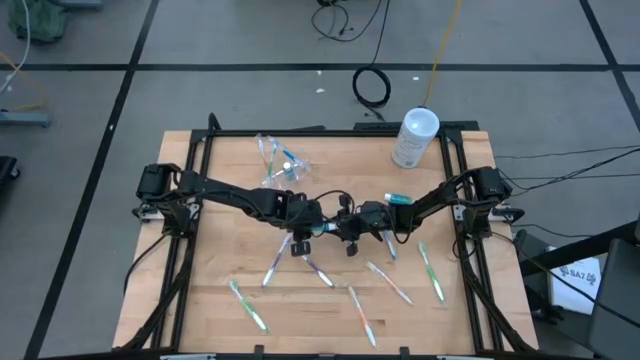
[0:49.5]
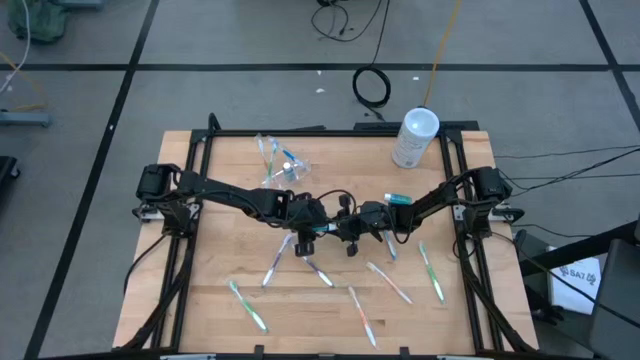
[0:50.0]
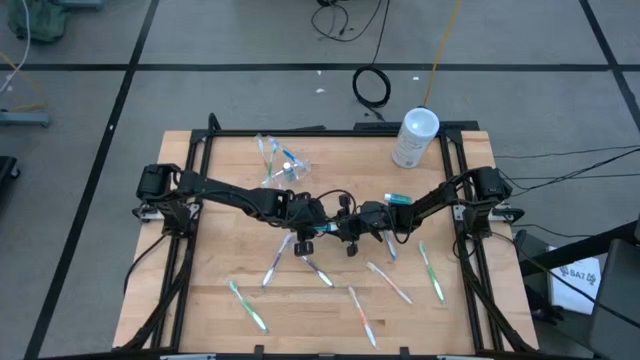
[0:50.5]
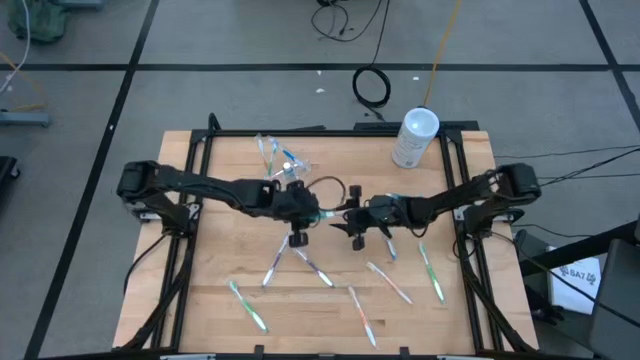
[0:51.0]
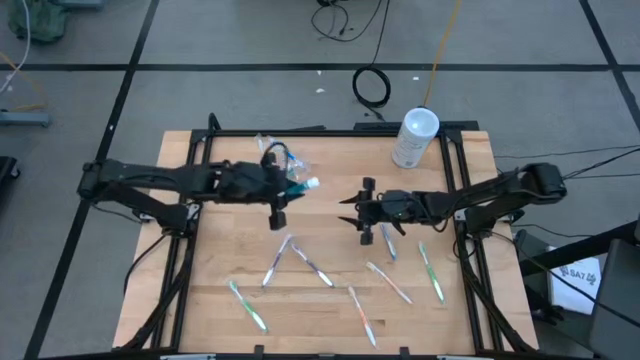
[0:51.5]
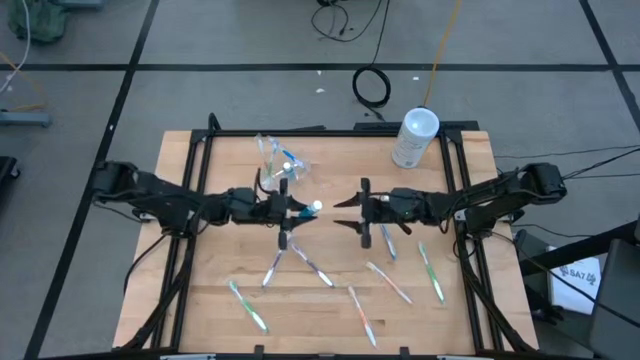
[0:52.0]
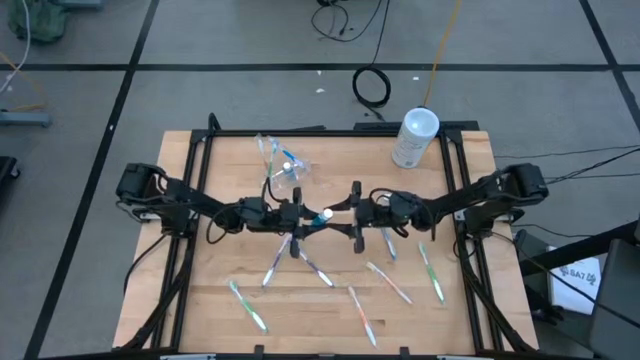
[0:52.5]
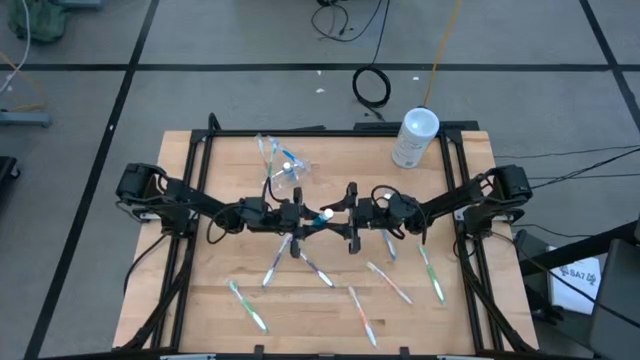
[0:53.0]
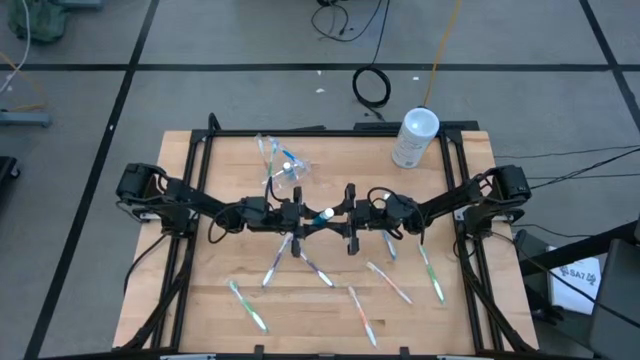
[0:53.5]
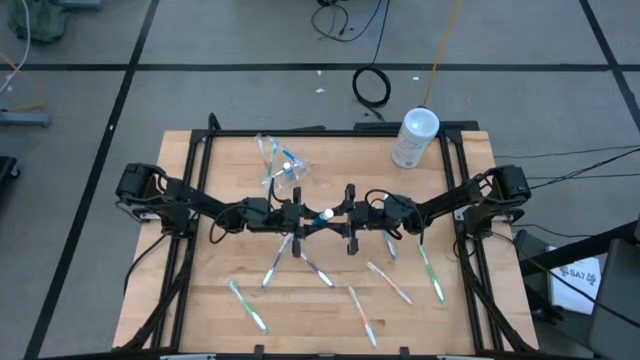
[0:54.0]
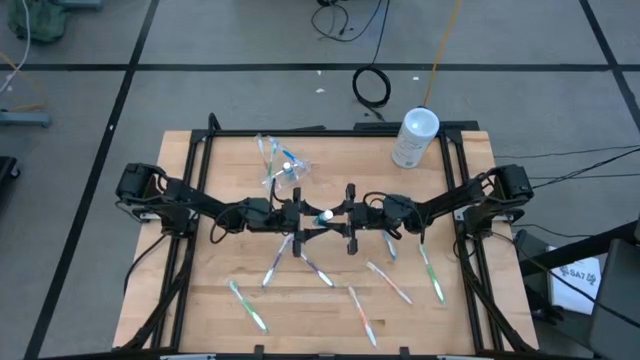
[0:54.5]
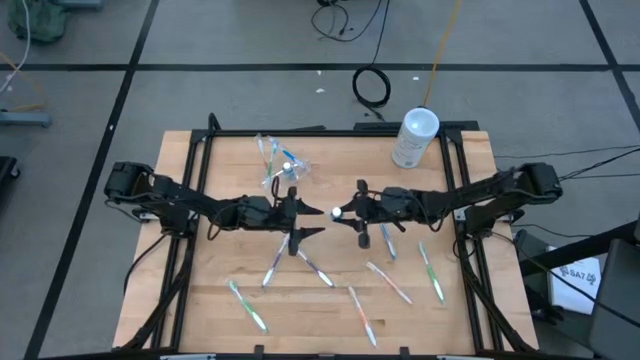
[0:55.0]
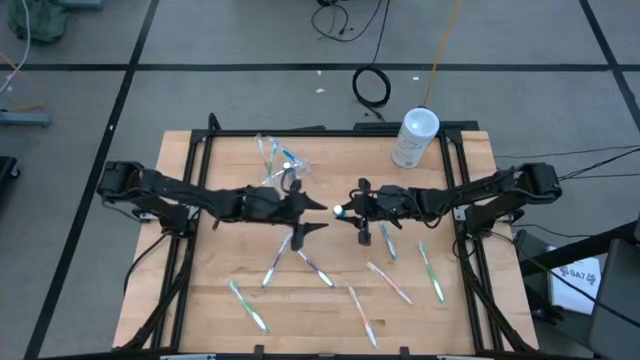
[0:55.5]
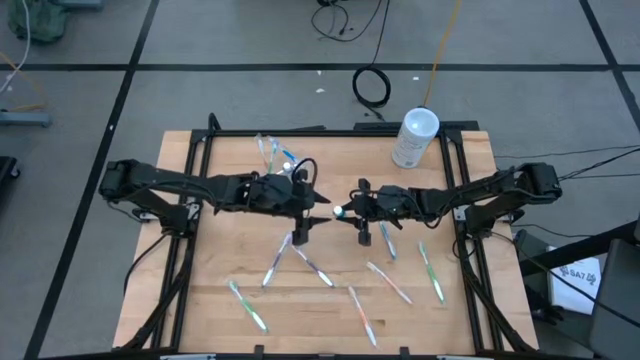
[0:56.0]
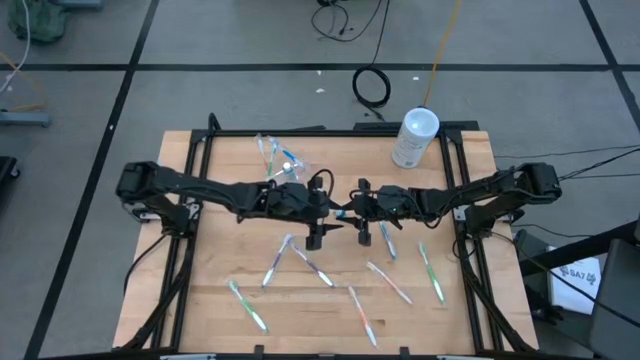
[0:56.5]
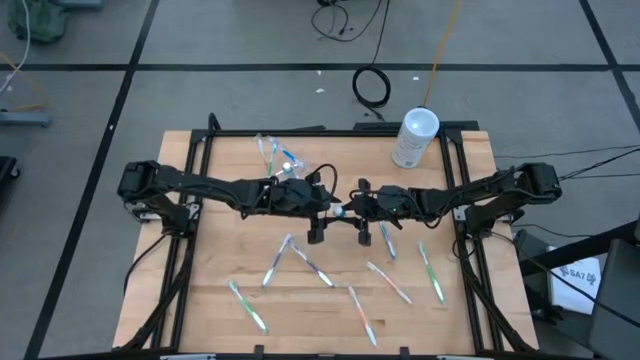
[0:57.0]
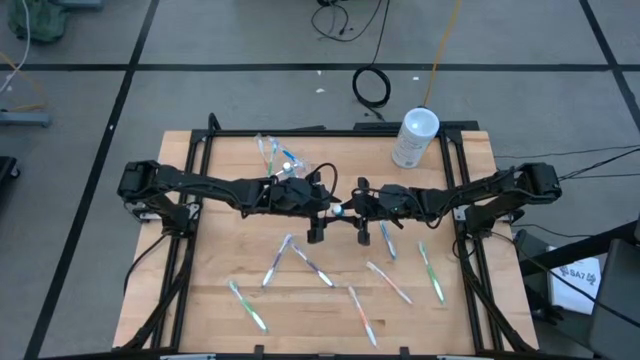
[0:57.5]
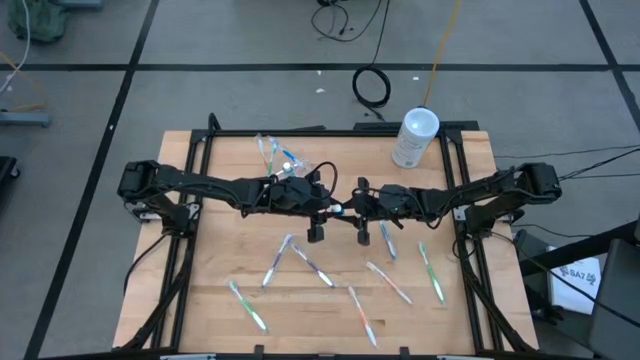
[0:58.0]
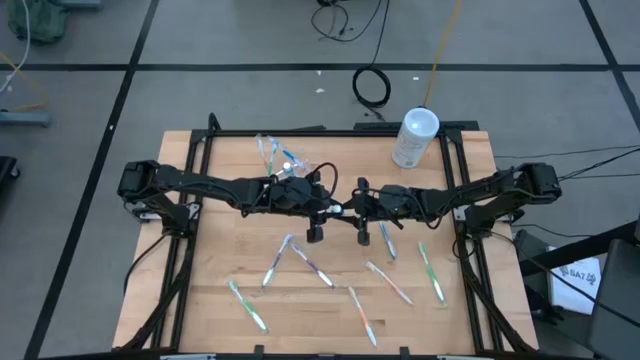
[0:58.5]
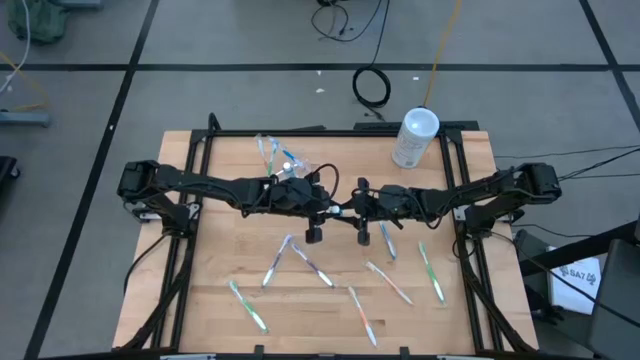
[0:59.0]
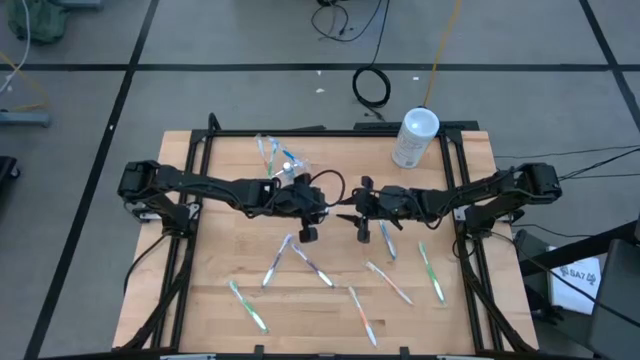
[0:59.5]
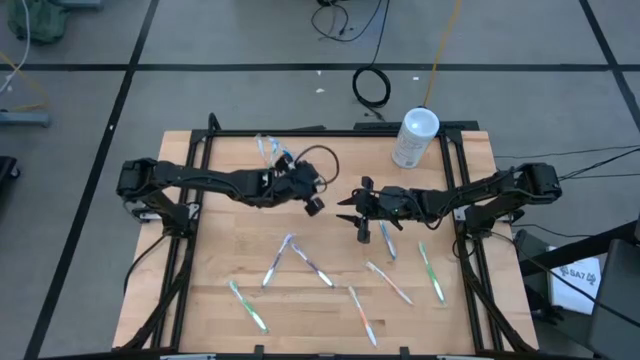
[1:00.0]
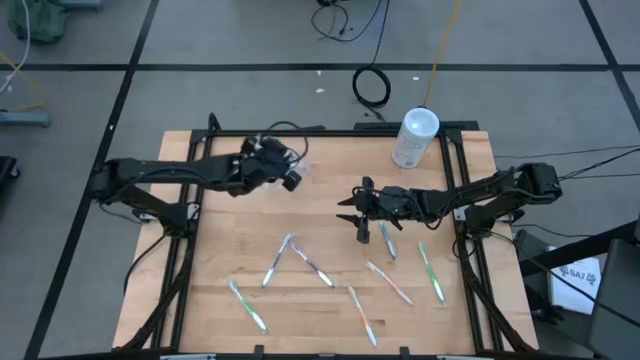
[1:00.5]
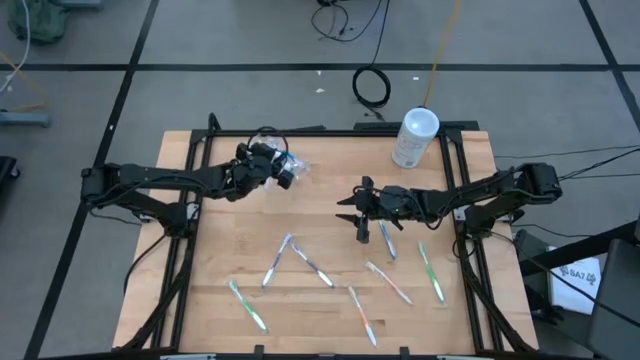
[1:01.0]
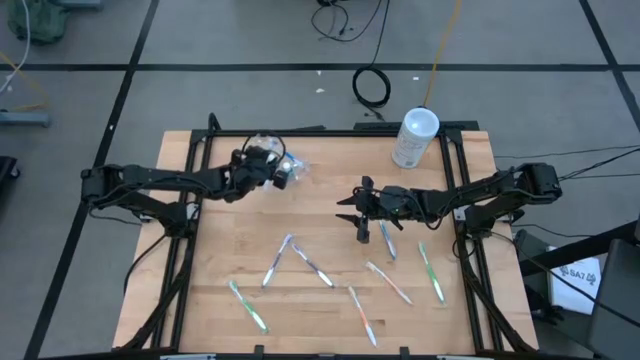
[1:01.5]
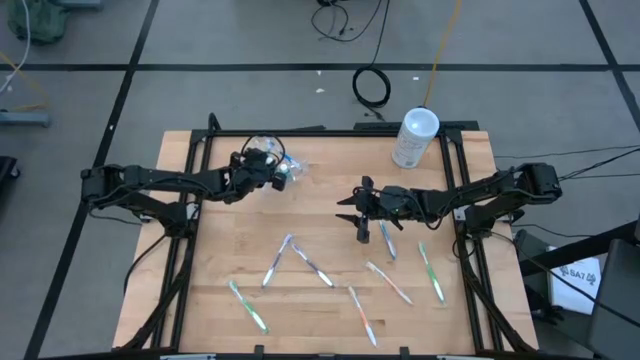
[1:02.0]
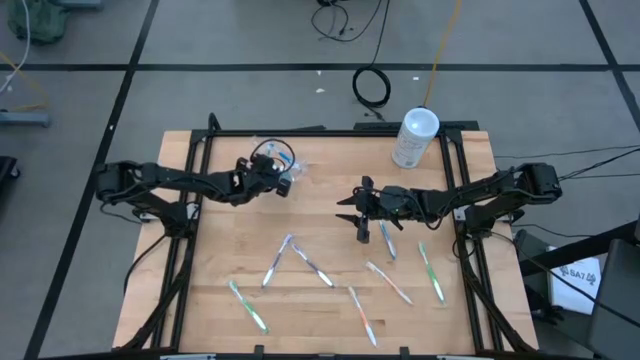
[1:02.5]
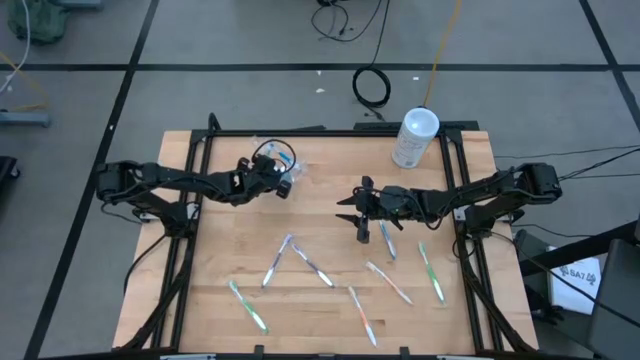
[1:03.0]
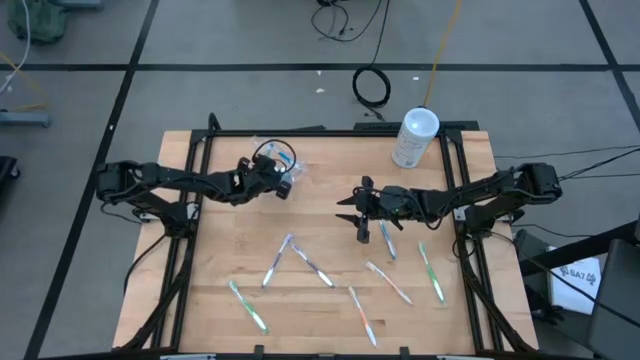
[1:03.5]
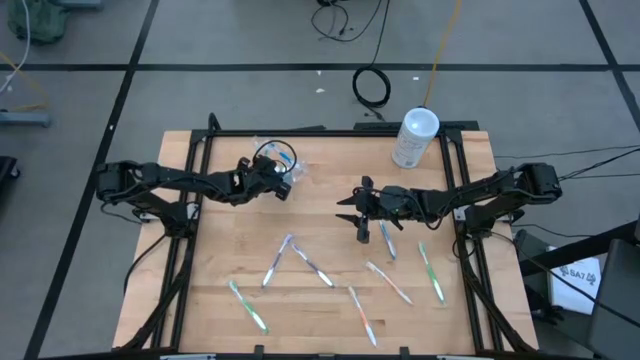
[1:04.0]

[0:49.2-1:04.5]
Task: Pick & Place toothbrushing station
Put the mouthwash into the transparent organizer

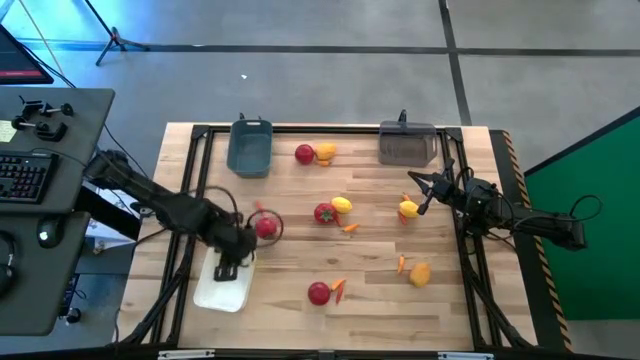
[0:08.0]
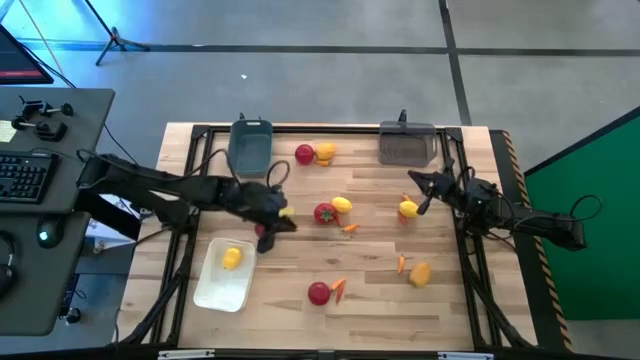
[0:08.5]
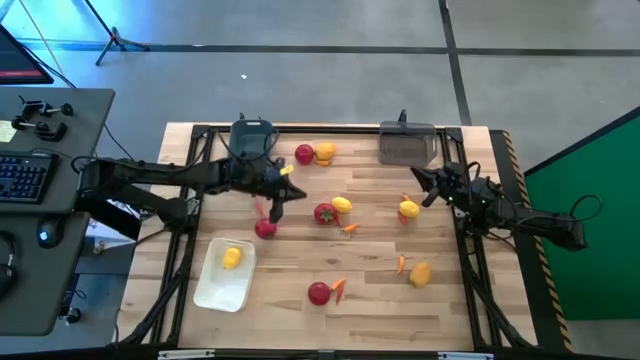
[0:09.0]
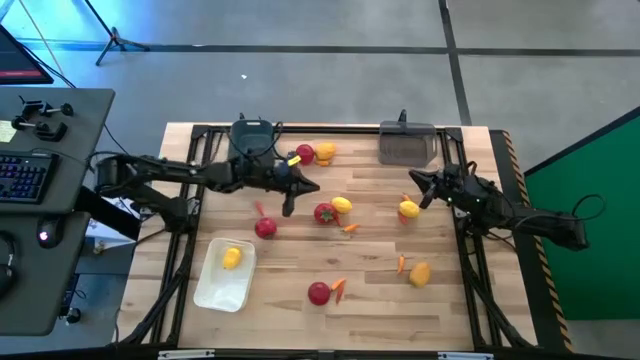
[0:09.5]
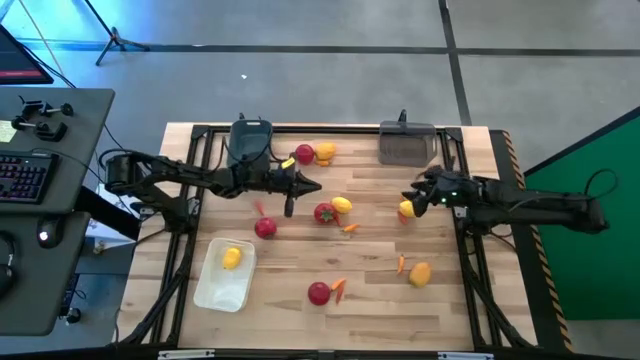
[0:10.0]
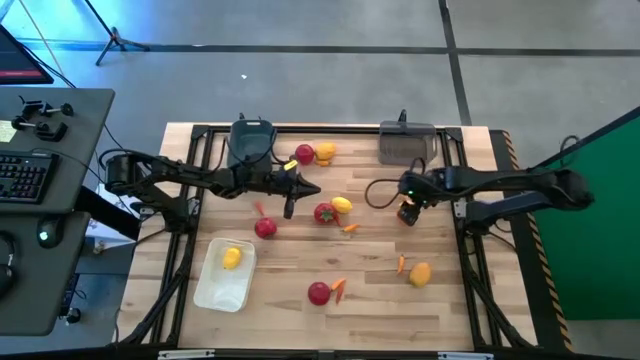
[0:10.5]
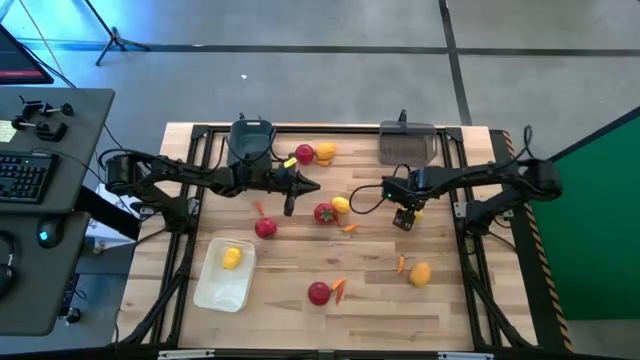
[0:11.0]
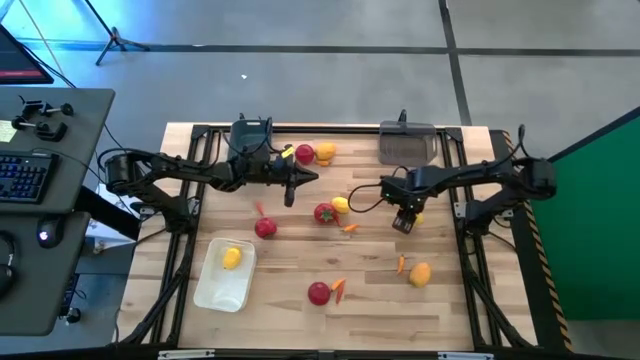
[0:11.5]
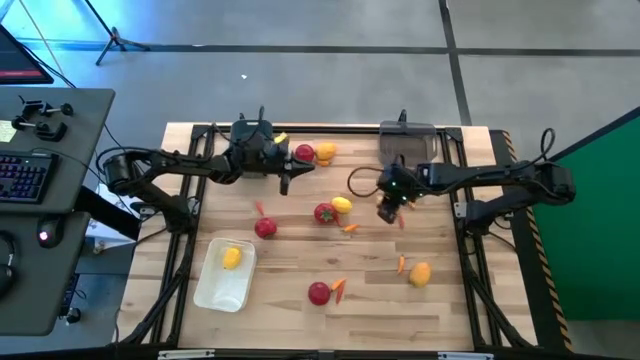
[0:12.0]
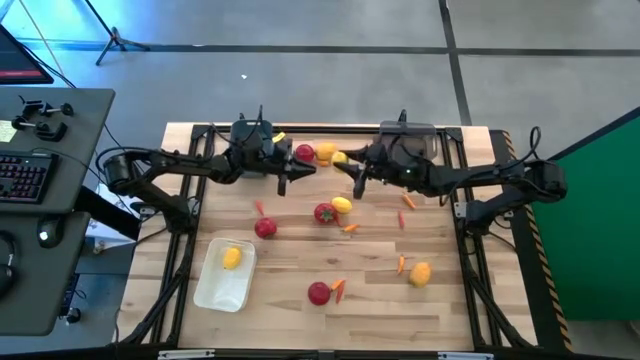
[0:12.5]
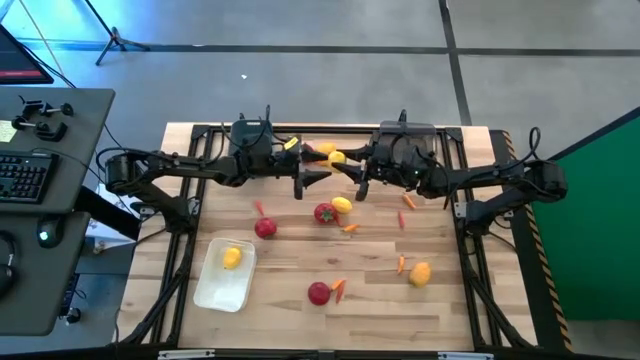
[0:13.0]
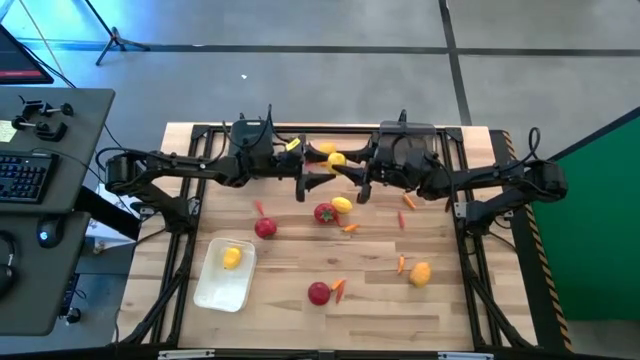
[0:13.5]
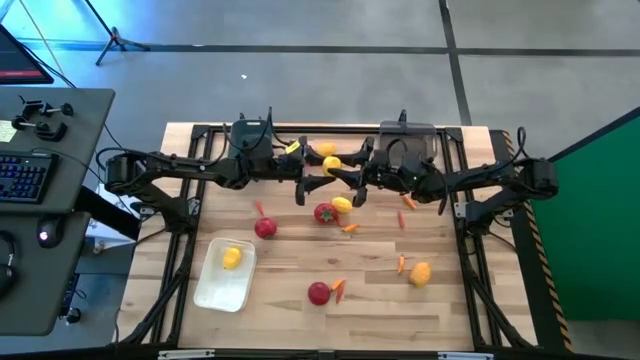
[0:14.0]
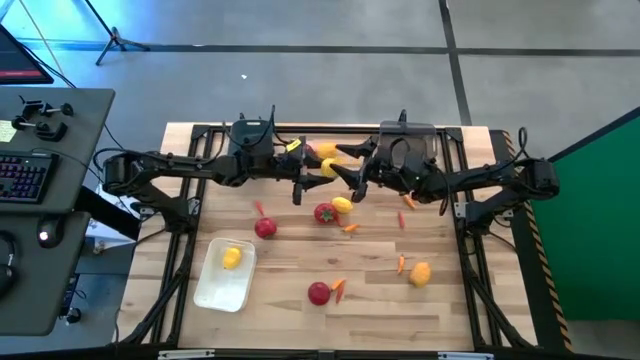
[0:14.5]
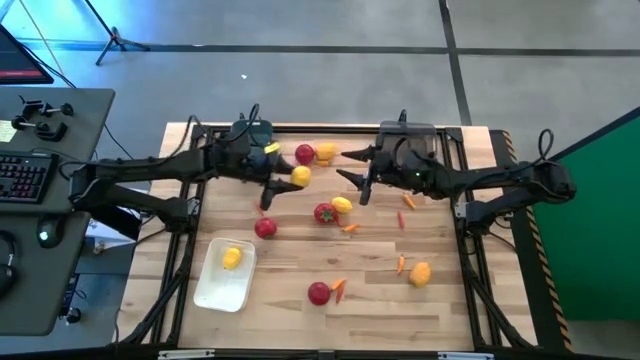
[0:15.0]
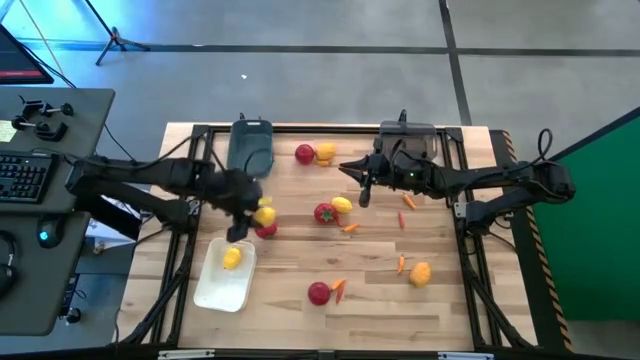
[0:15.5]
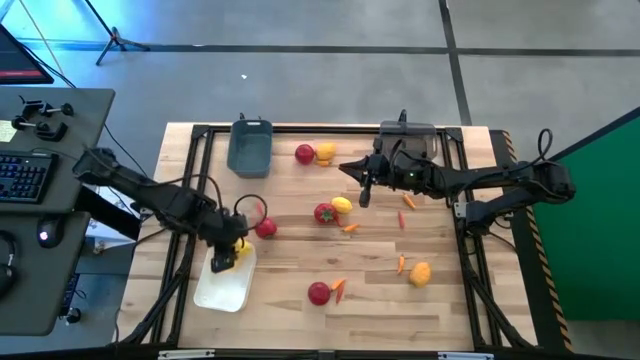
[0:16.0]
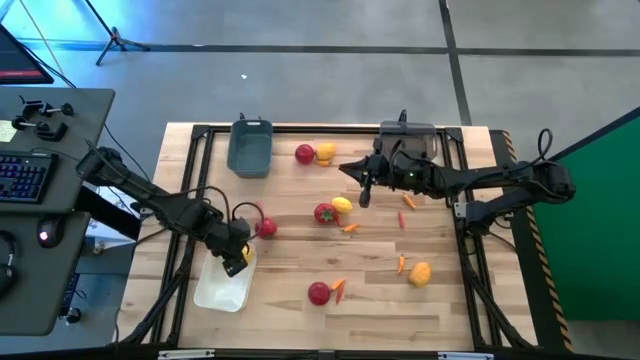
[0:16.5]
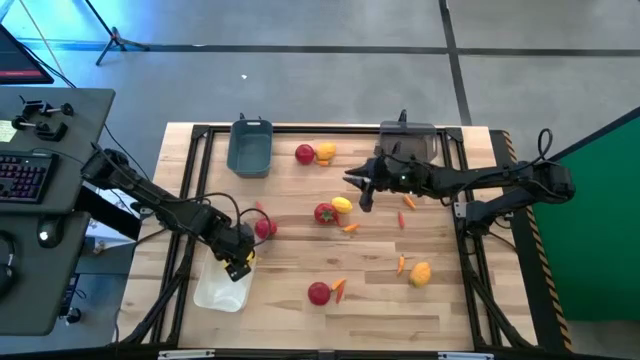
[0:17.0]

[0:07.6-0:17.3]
Task: Sort produce into baskets
Put the yellow lemon into the white bin
